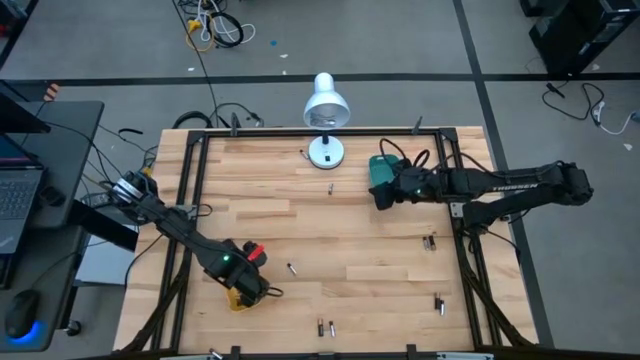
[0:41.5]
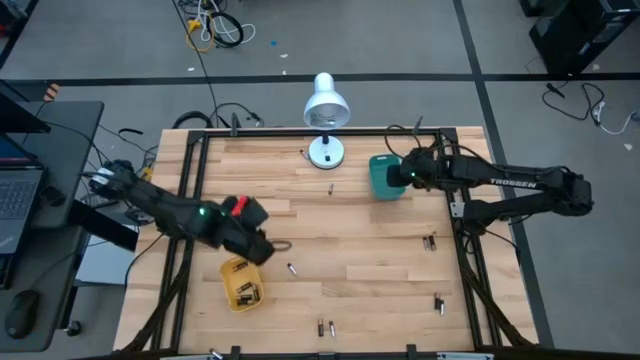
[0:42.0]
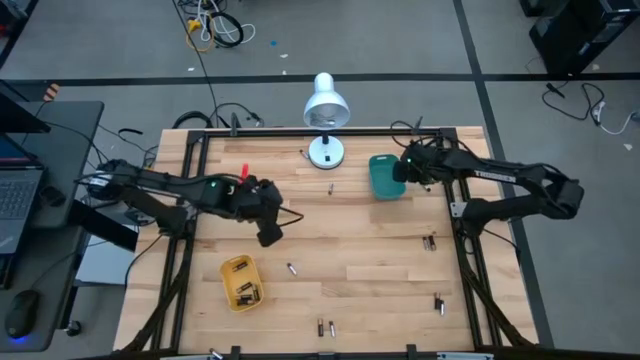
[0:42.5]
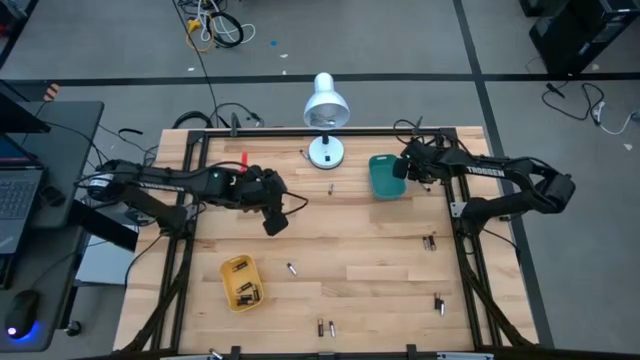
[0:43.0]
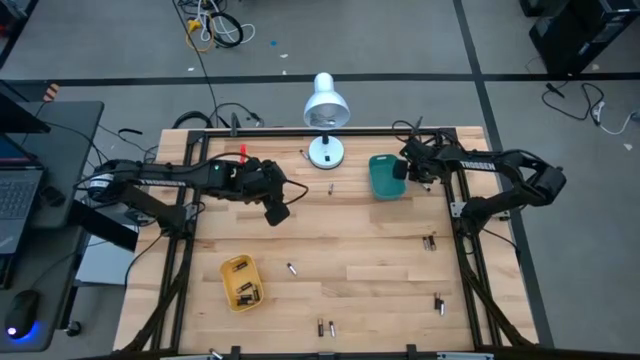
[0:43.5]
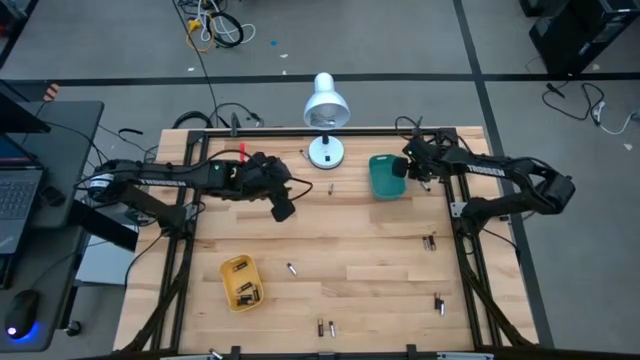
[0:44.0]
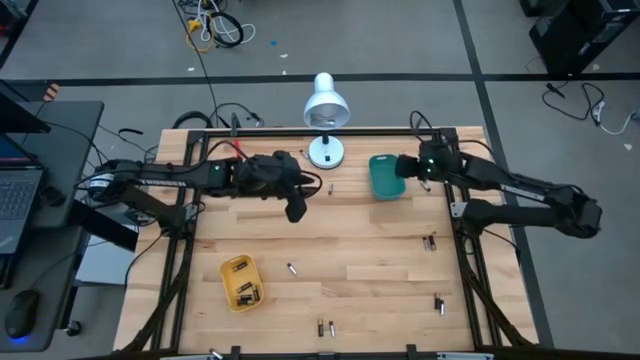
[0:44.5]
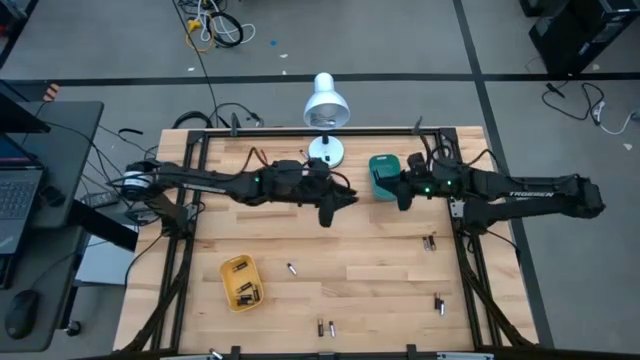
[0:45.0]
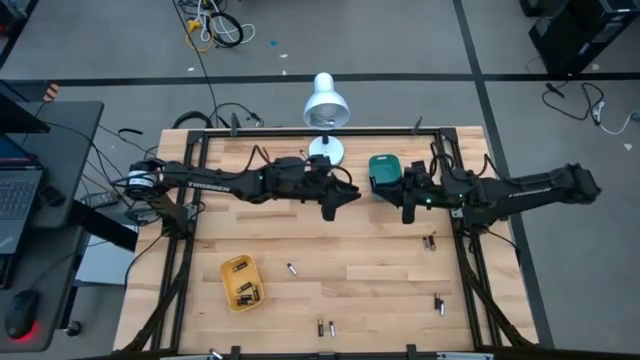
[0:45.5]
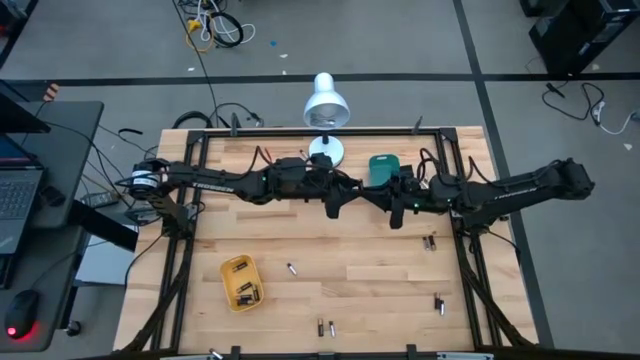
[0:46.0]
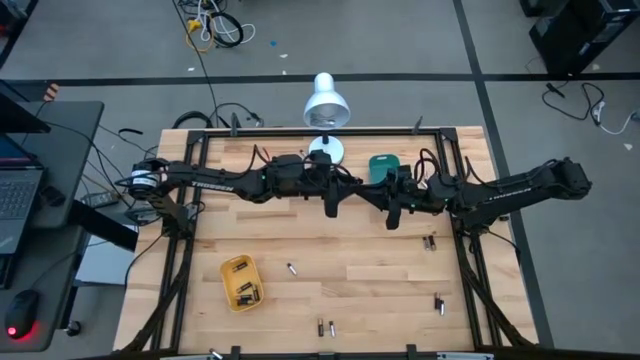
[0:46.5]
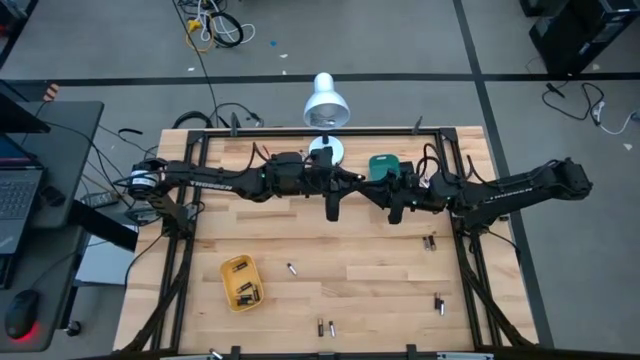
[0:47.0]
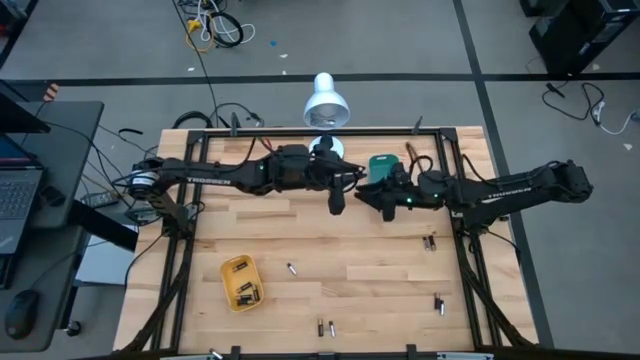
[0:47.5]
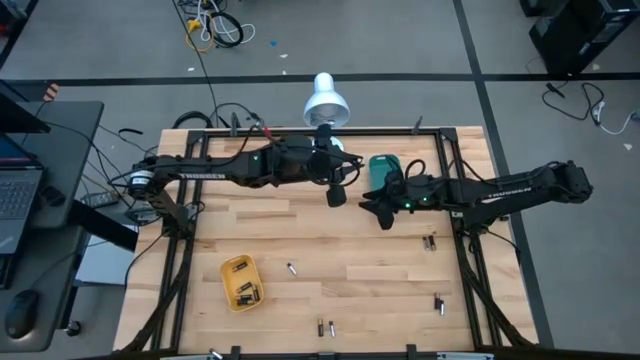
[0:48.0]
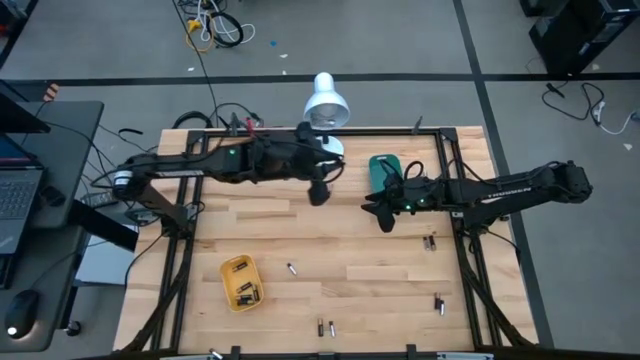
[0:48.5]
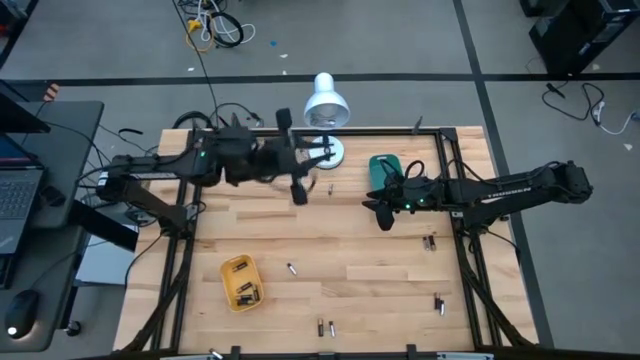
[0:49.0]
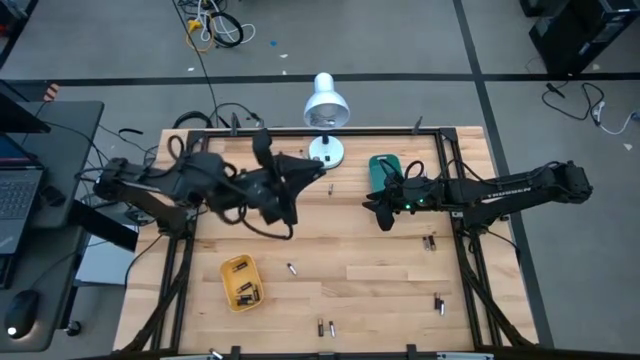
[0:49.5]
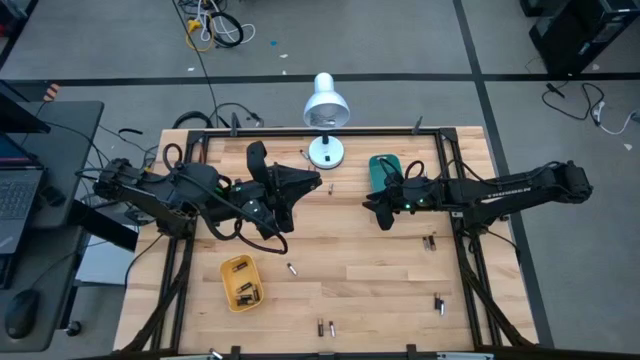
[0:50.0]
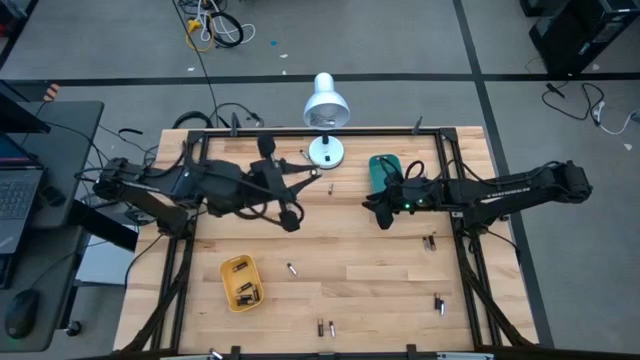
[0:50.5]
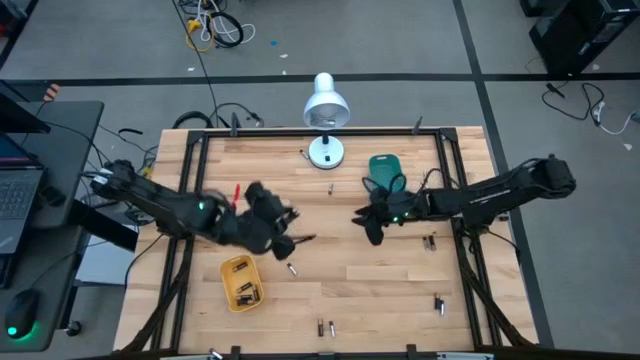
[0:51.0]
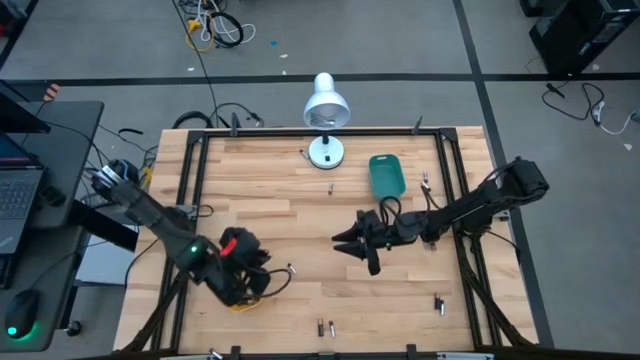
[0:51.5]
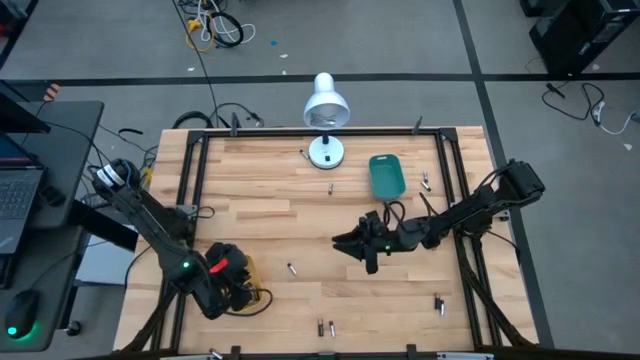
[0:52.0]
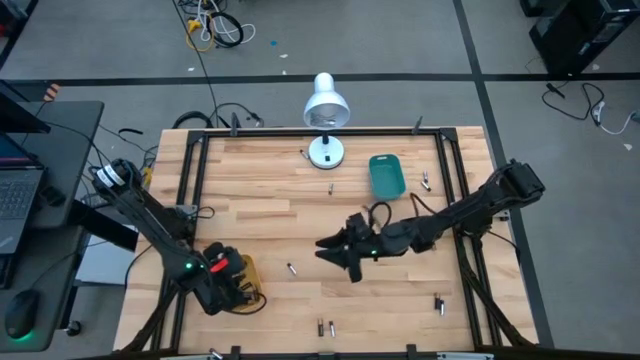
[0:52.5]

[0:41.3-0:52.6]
Task: Sort batteries
Put the golden battery into the yellow bin

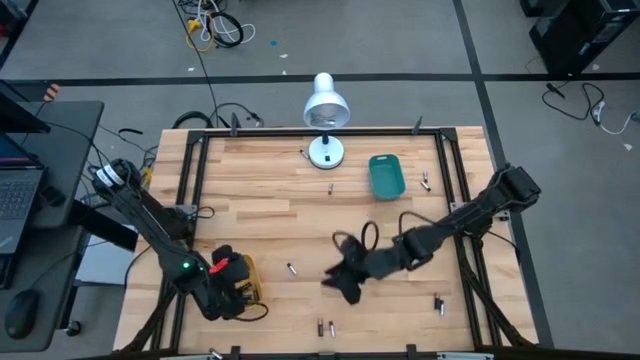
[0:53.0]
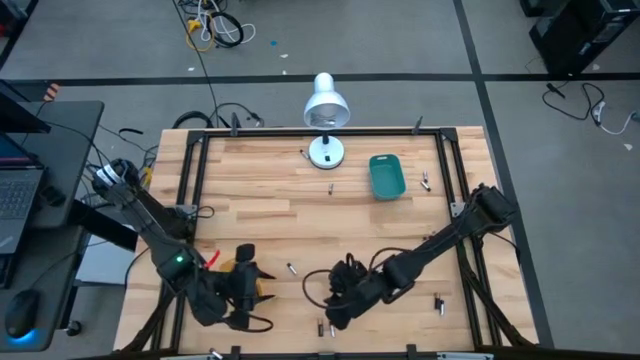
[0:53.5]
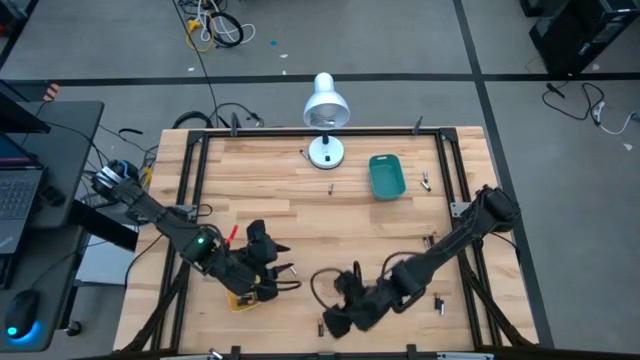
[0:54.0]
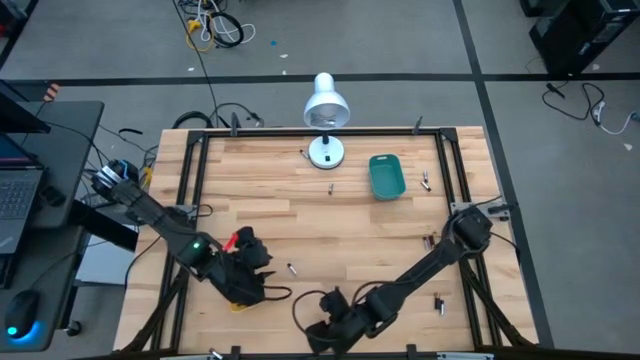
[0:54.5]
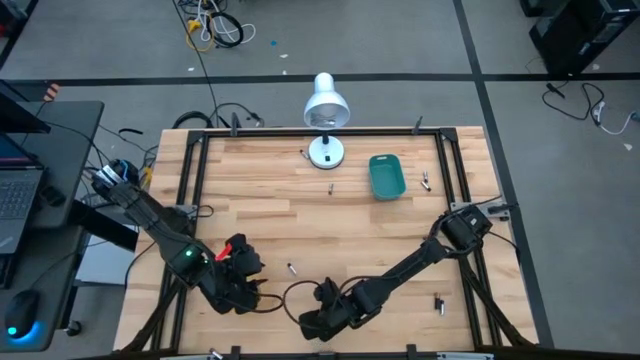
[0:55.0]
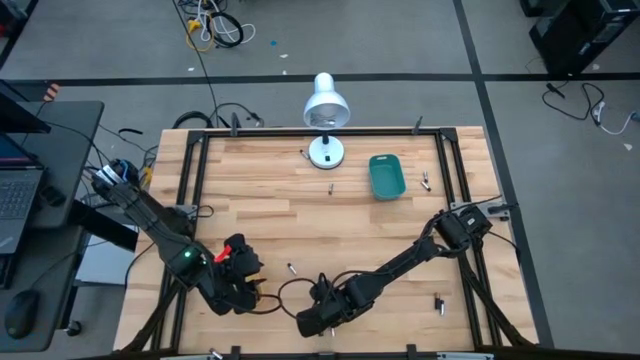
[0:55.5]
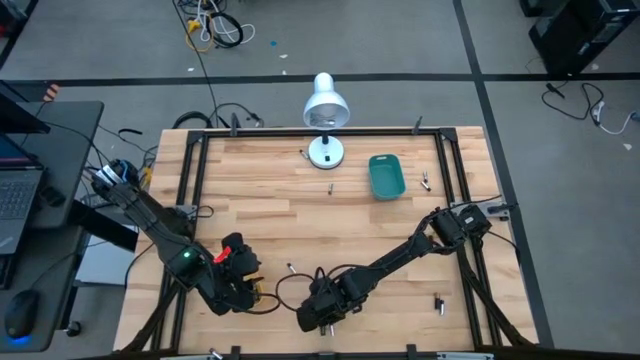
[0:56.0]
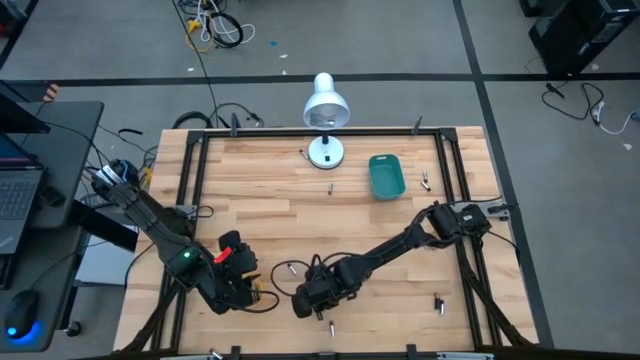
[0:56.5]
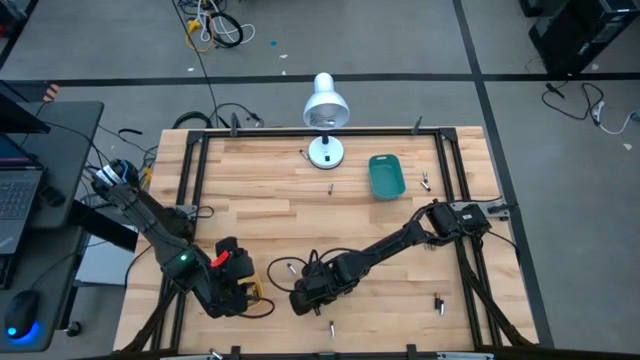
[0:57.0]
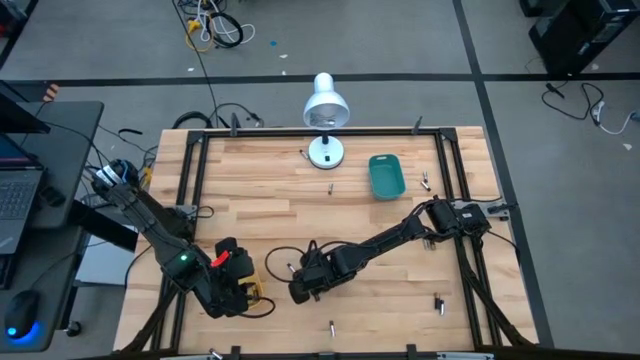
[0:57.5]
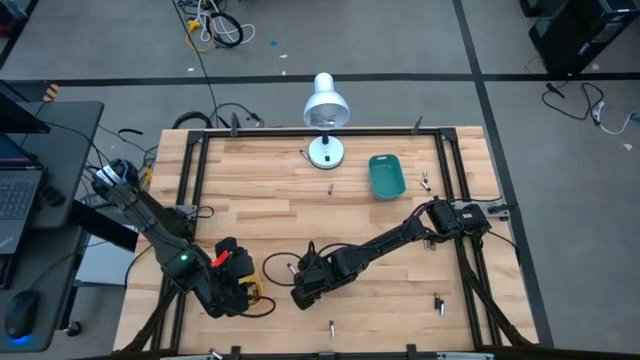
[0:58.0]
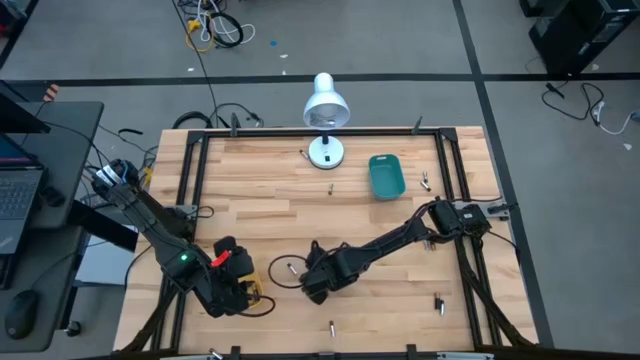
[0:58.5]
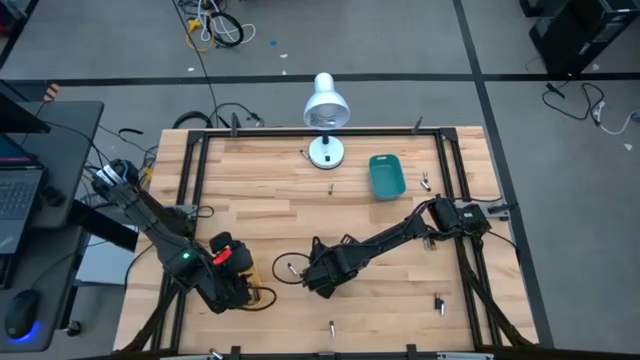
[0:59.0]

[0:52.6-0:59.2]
Put the bottom left golden battery into the yellow bin

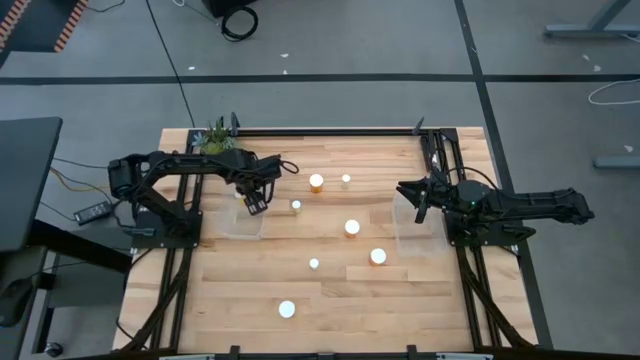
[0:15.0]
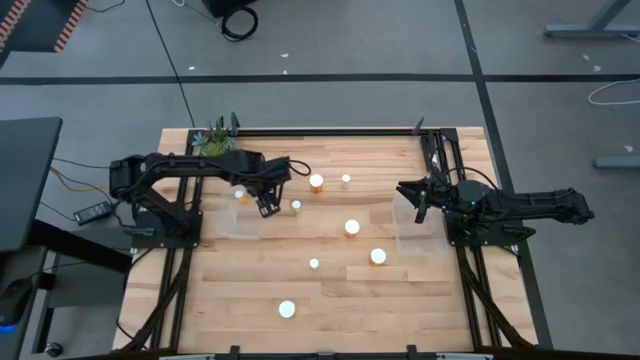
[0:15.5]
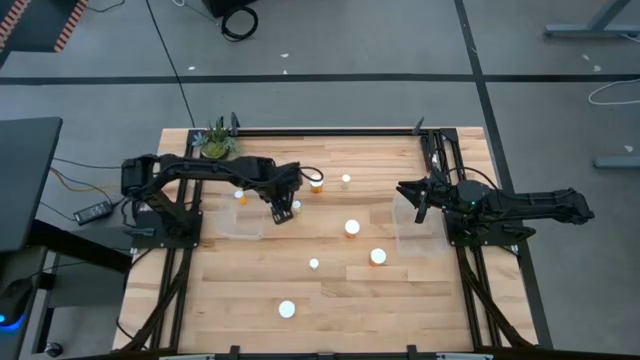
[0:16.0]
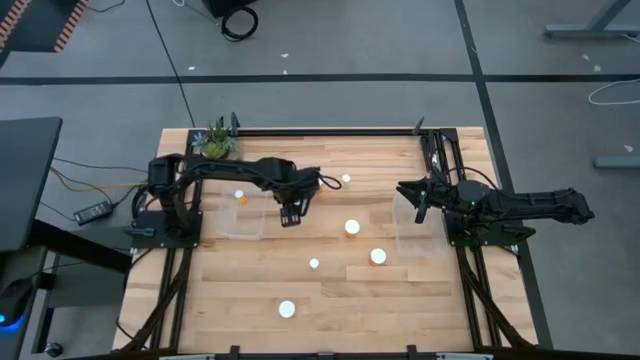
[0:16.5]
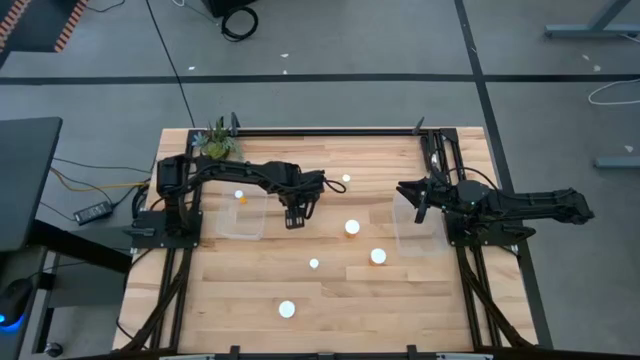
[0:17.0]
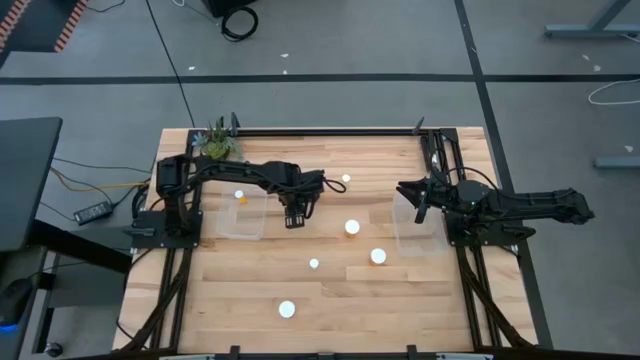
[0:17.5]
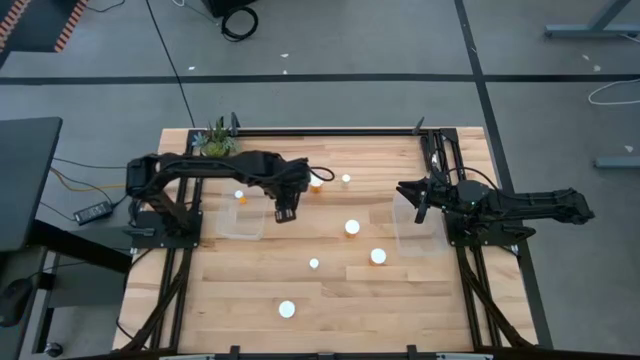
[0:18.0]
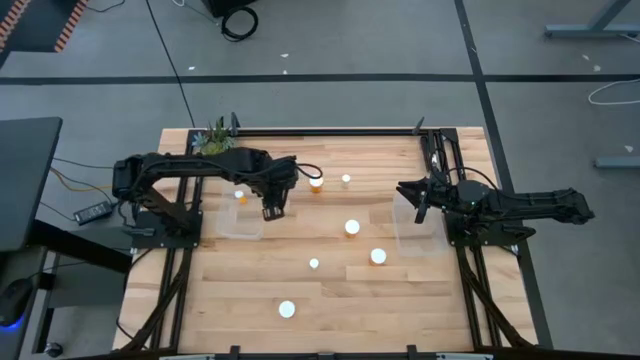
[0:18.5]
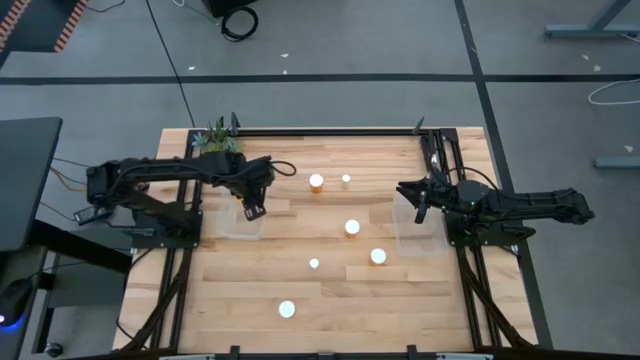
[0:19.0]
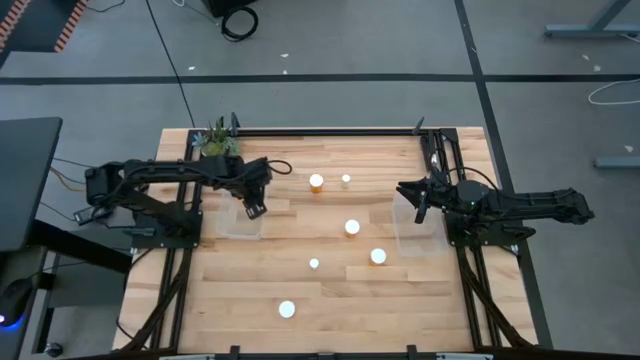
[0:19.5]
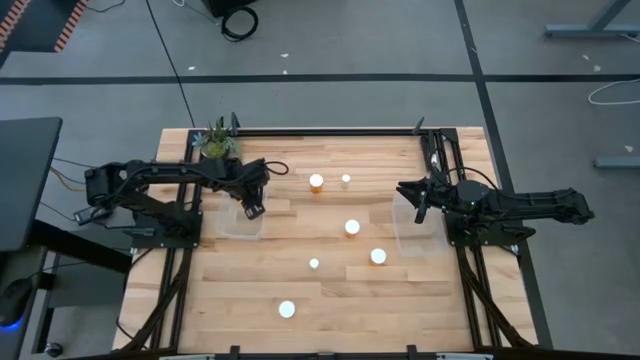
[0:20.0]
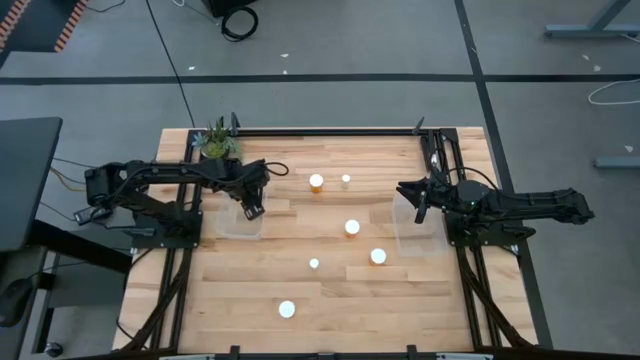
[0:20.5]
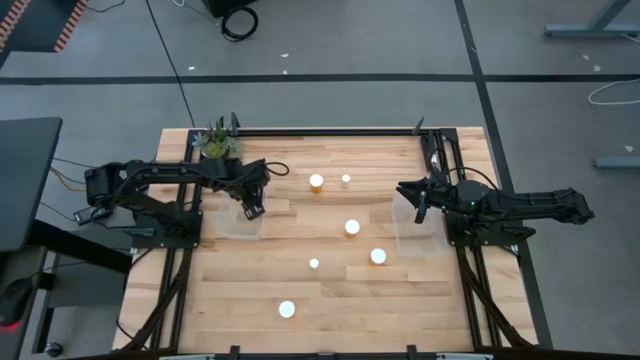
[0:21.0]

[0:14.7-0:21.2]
Task: Pick and place medicine bottles into bin by pill shape (circle, oval)
Put the yellow pill bottle into the left transparent bin
